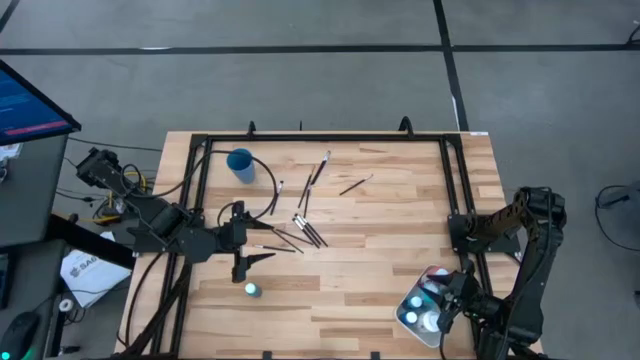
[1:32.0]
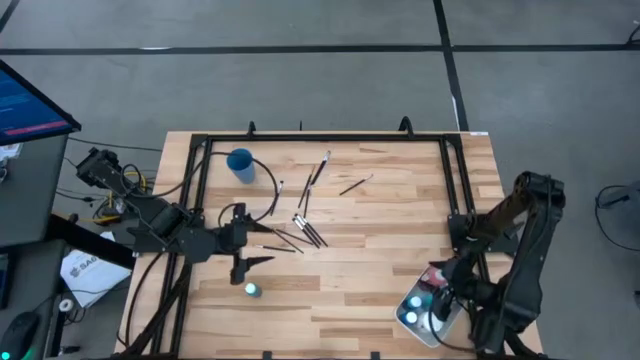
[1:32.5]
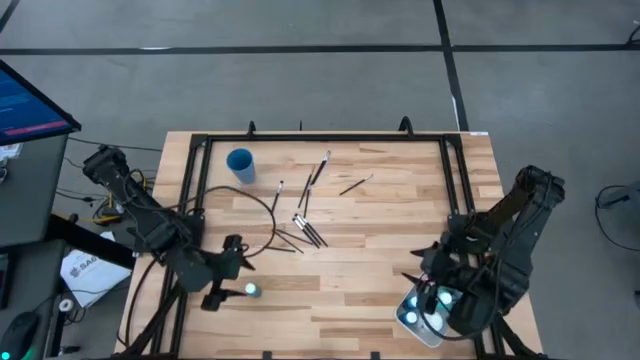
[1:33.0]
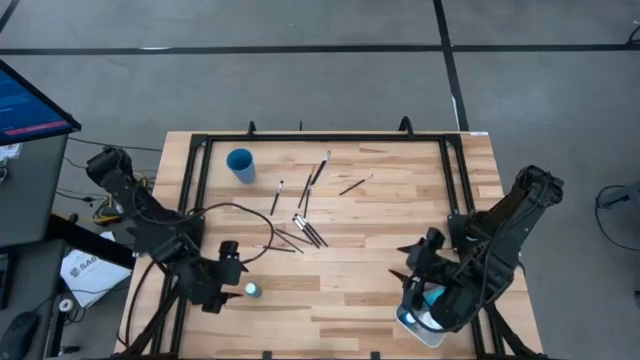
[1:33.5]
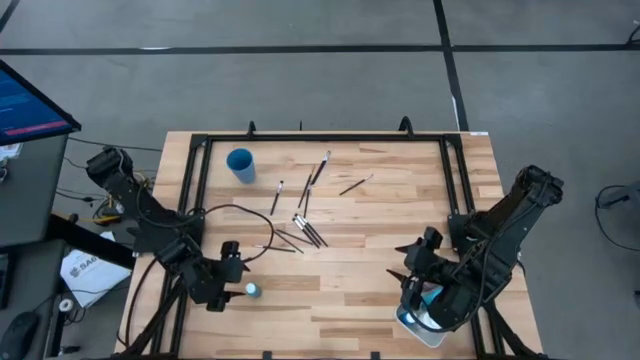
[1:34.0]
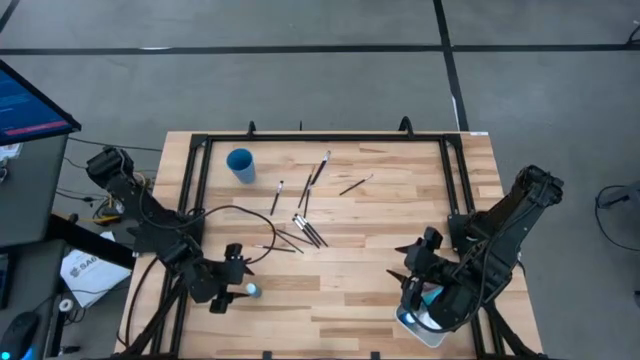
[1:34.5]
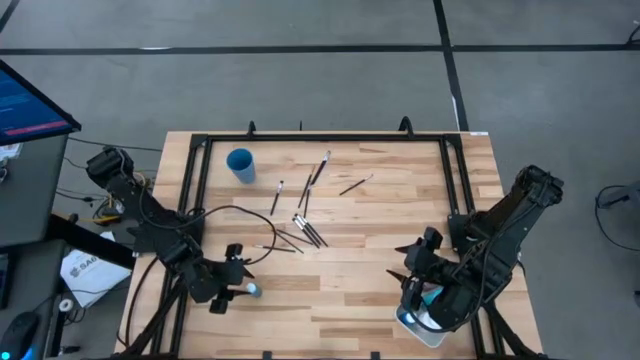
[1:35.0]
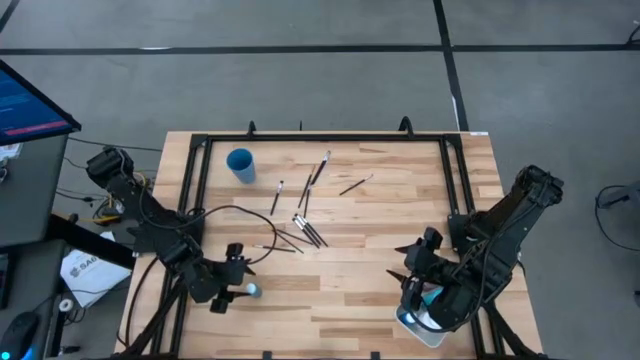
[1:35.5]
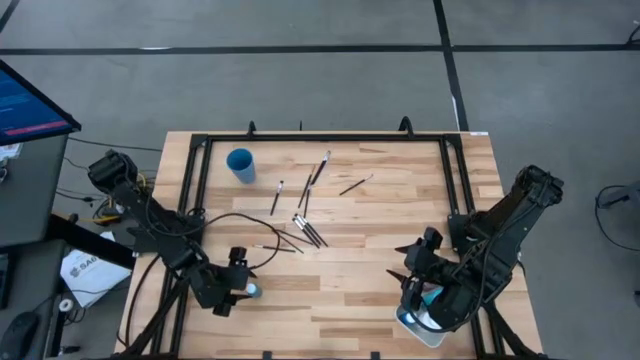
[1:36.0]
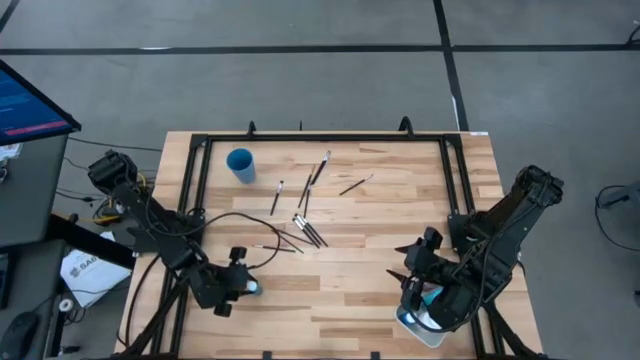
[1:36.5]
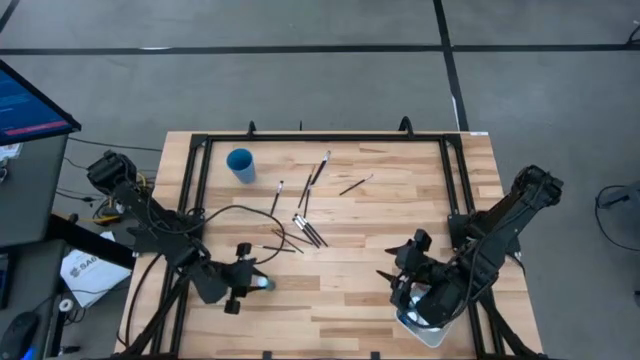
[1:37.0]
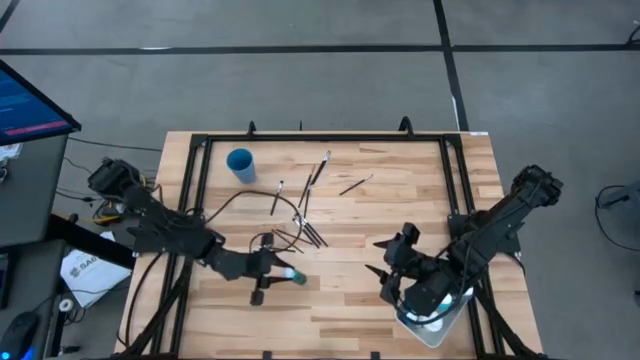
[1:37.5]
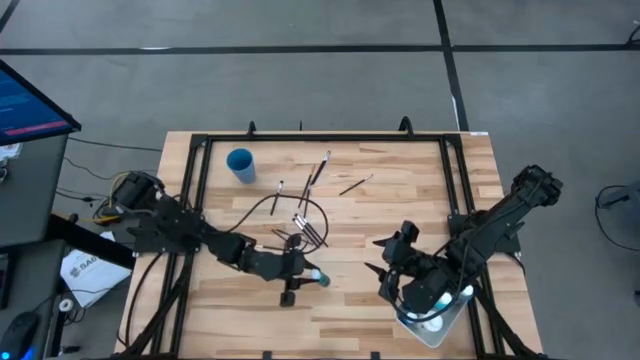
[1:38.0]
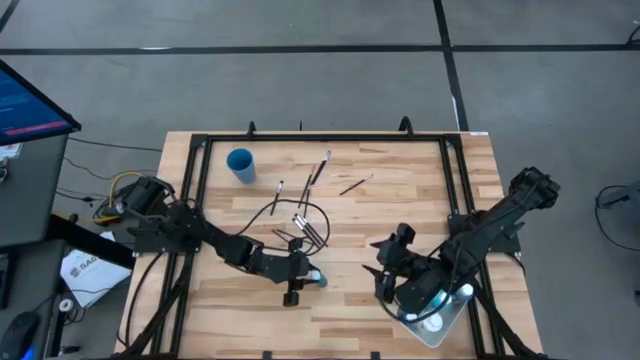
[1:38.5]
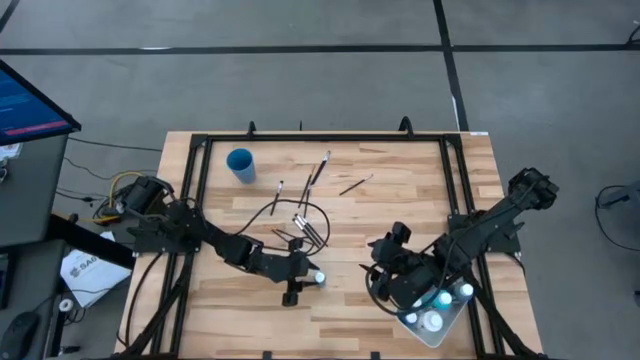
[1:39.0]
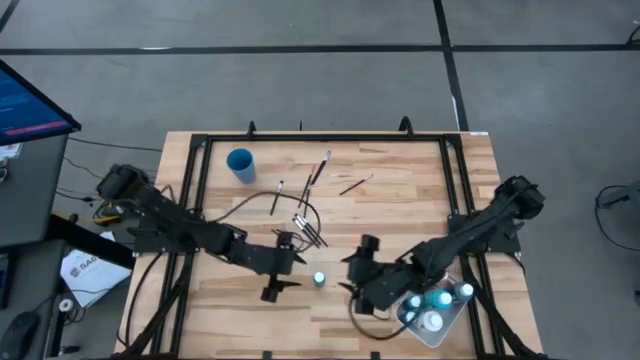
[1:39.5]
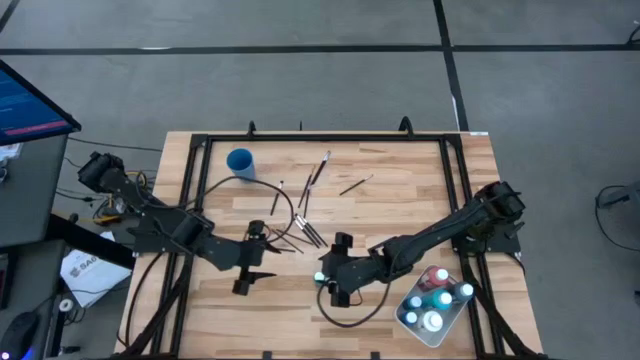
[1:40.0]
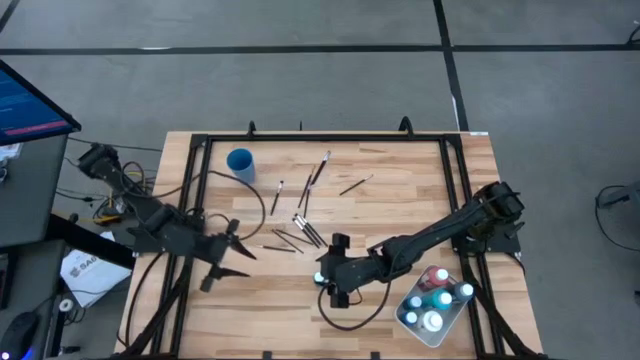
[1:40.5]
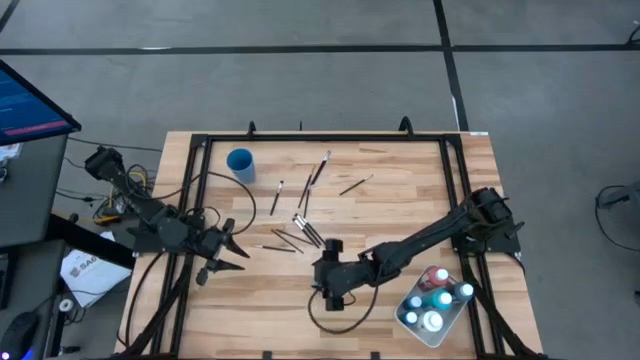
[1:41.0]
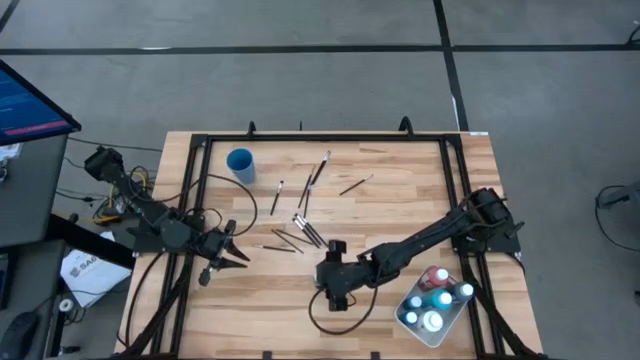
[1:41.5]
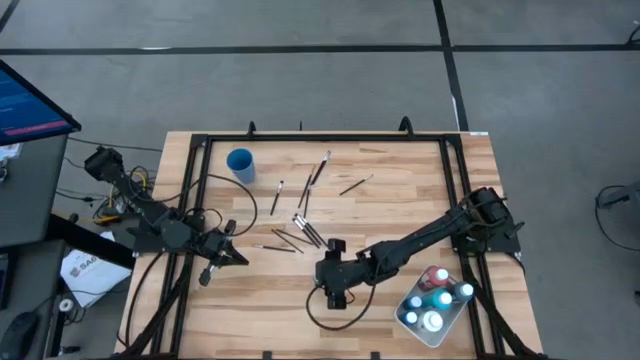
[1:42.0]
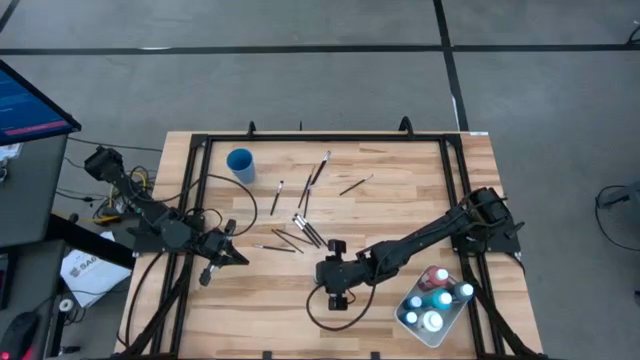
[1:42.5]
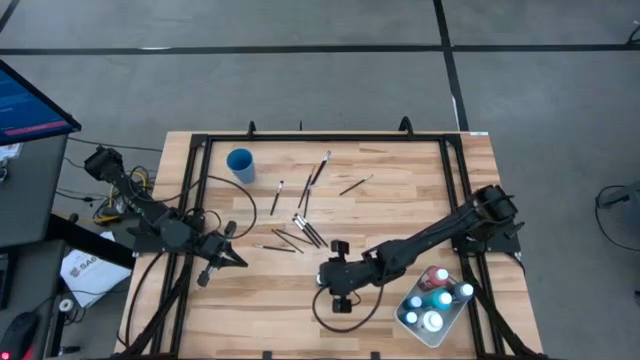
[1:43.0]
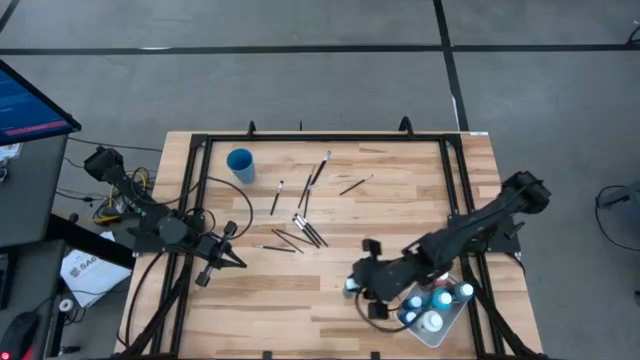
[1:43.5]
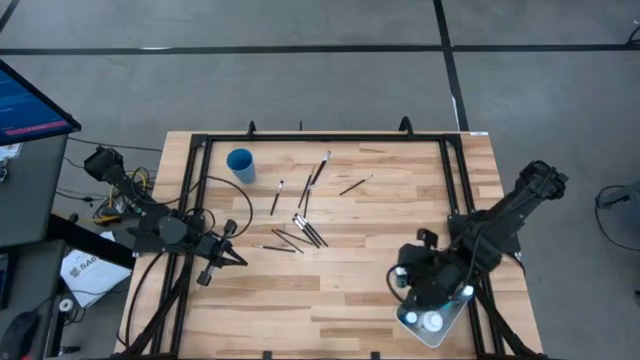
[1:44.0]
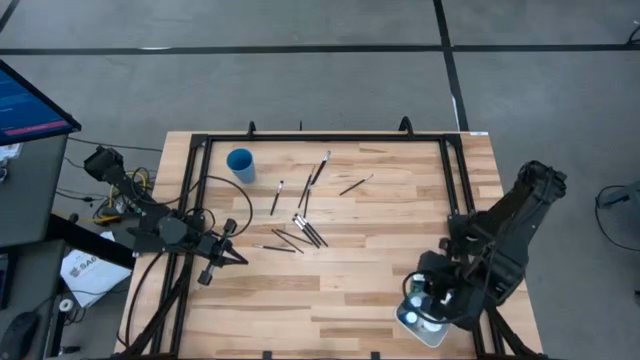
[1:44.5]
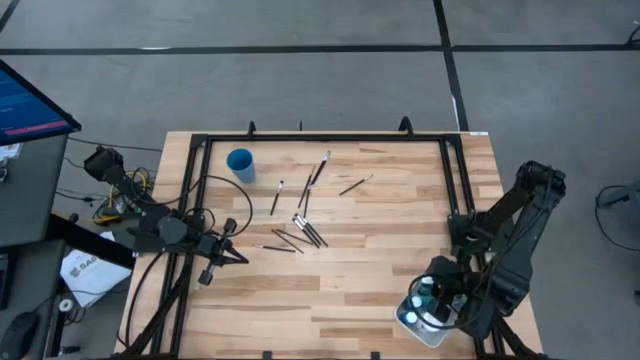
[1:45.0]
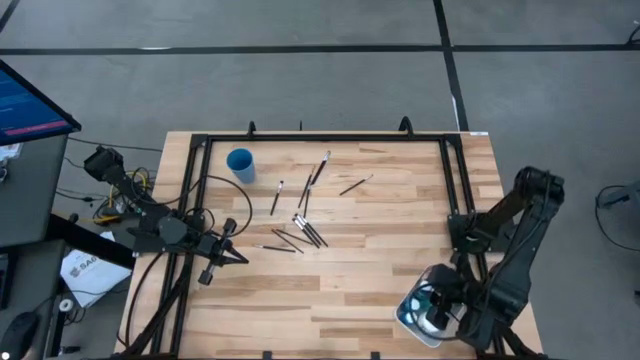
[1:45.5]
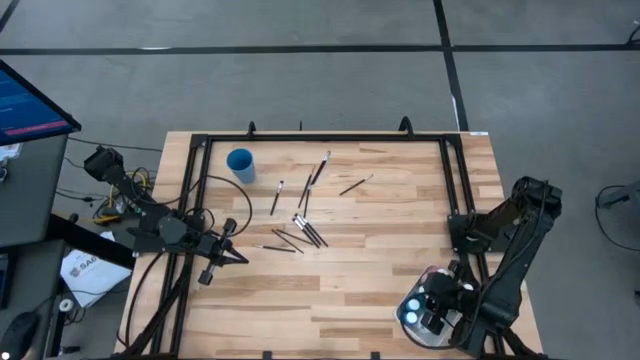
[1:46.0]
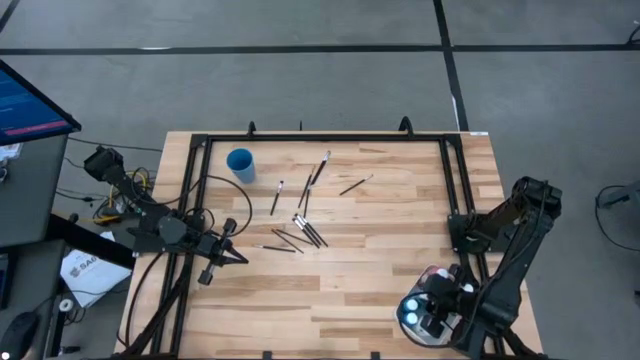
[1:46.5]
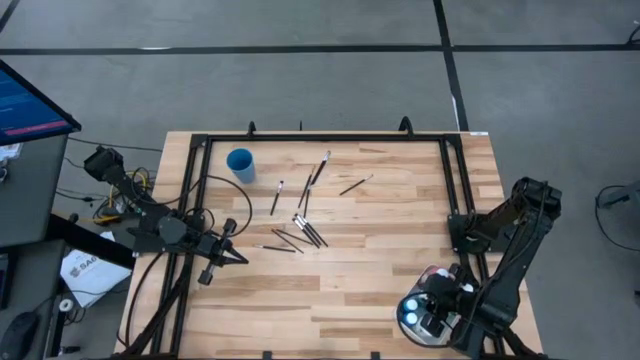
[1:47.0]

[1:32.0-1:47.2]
Task: Pick & Place Paint Supplies
Put the small green paint bottle into the white bin

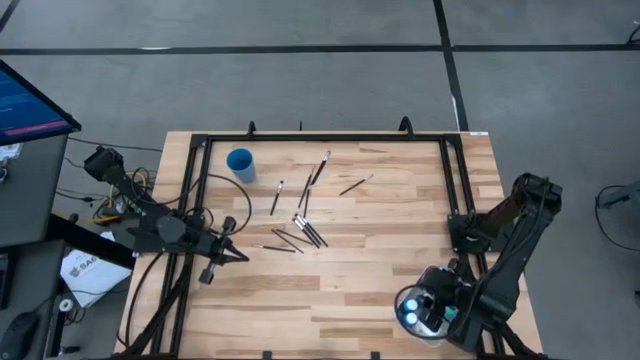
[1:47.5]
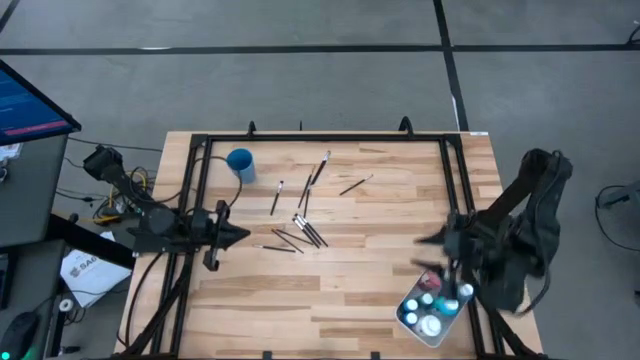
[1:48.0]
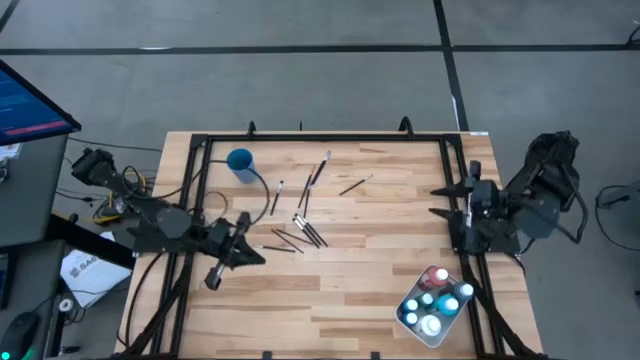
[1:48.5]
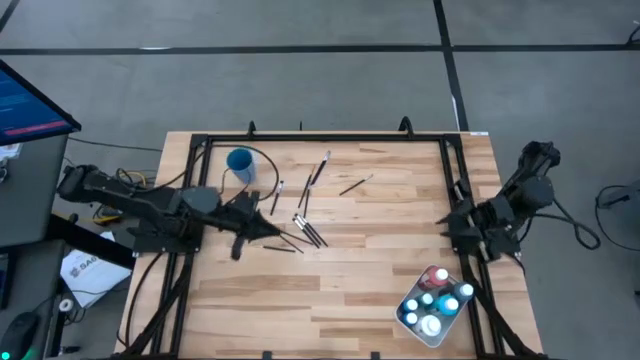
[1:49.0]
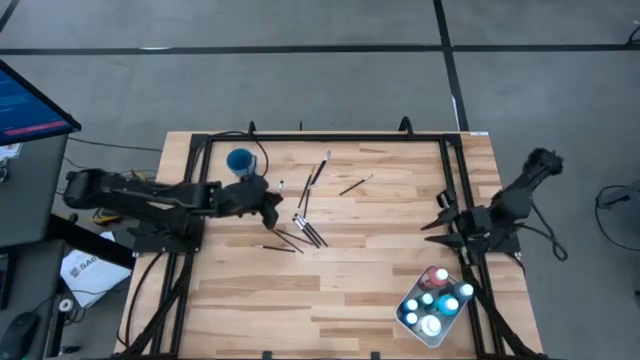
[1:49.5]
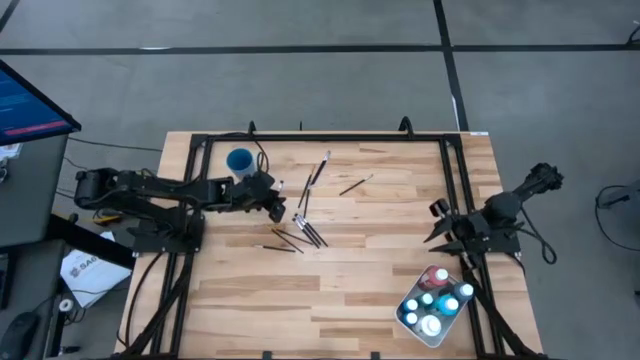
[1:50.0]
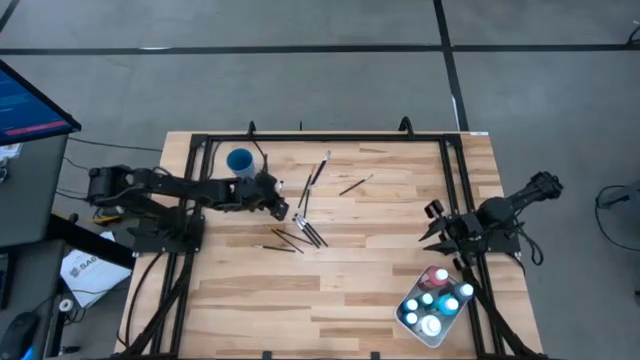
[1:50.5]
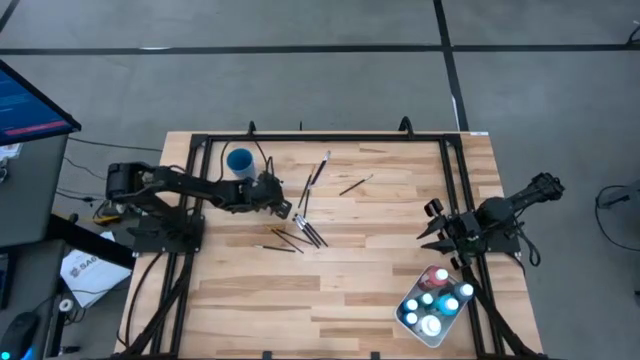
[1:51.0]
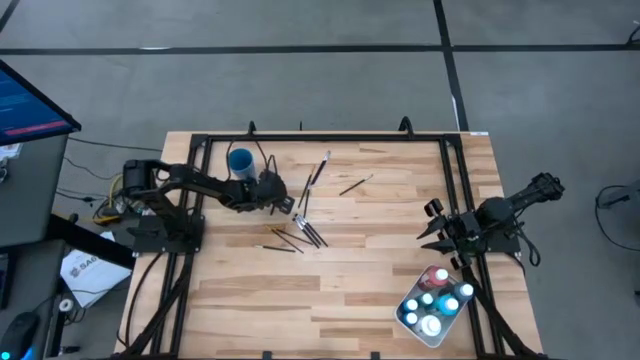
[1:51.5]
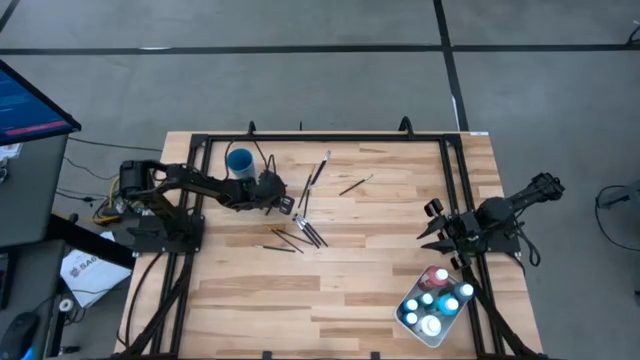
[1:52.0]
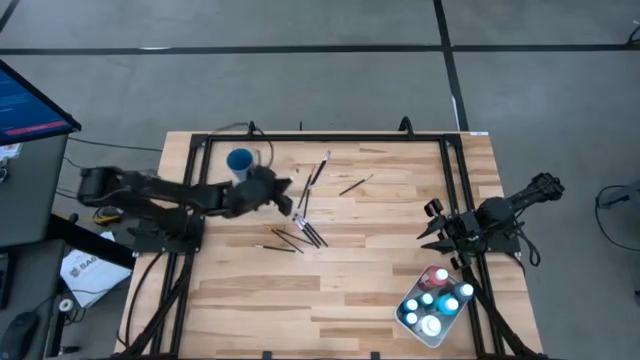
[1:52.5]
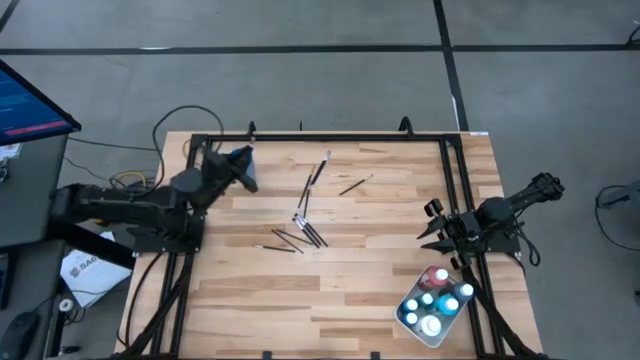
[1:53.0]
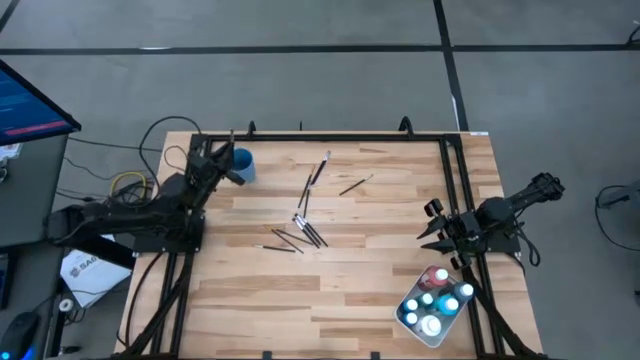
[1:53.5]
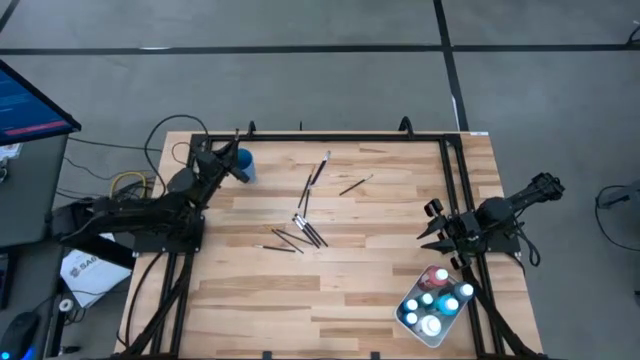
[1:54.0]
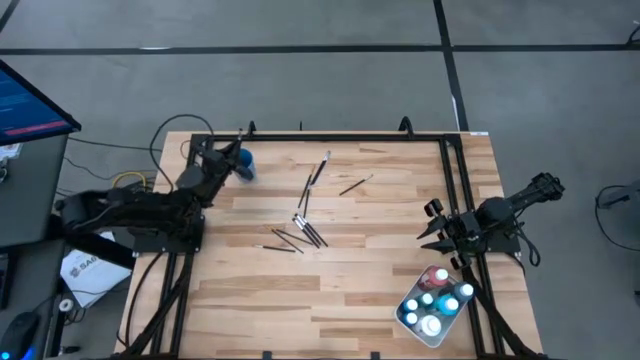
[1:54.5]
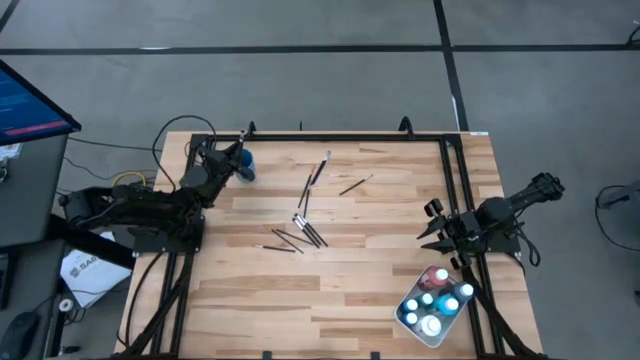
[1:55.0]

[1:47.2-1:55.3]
Put the silver paint brush into the blue cup
